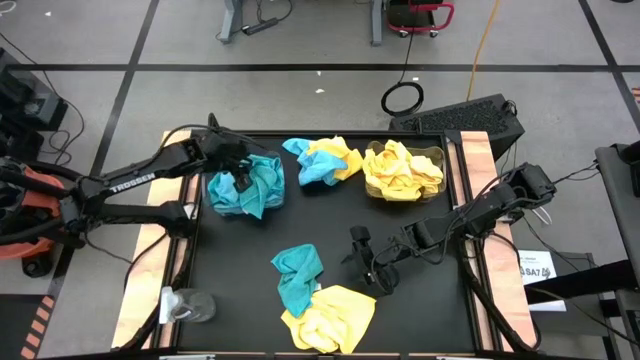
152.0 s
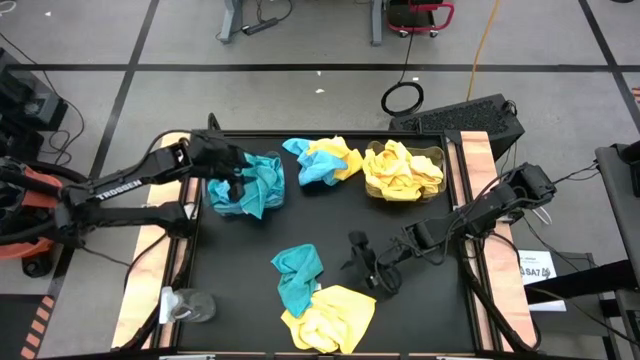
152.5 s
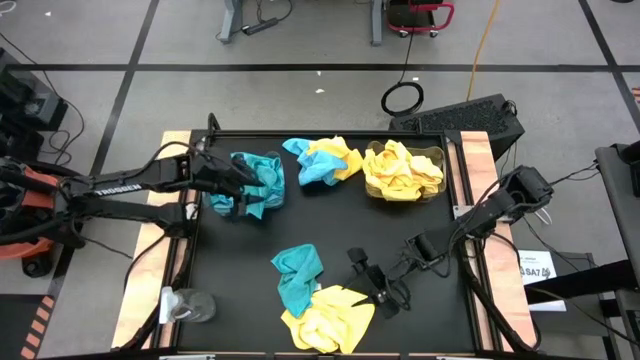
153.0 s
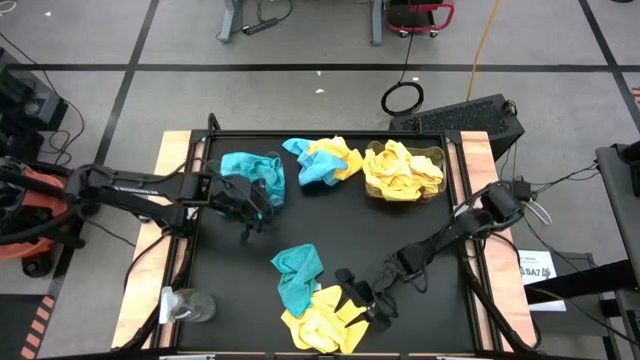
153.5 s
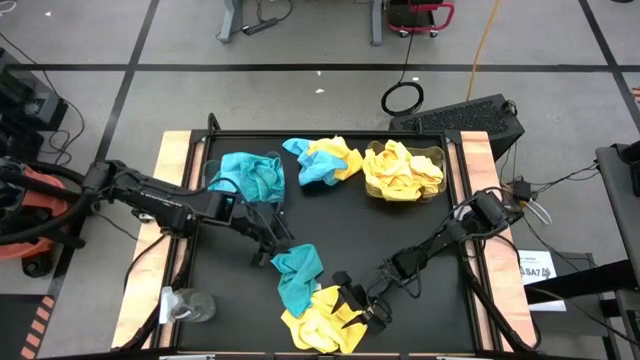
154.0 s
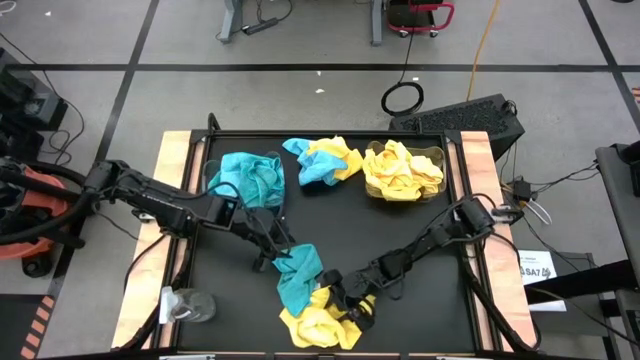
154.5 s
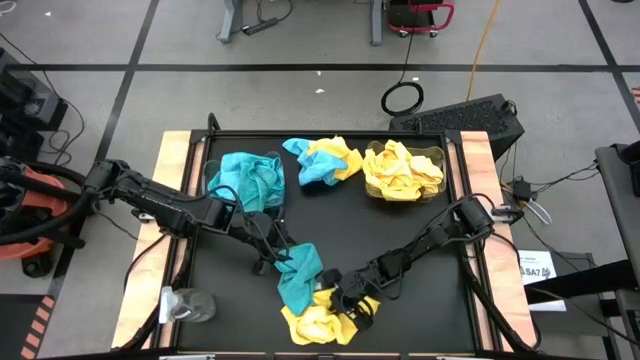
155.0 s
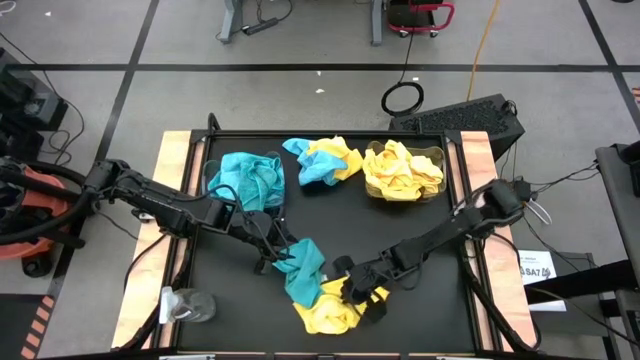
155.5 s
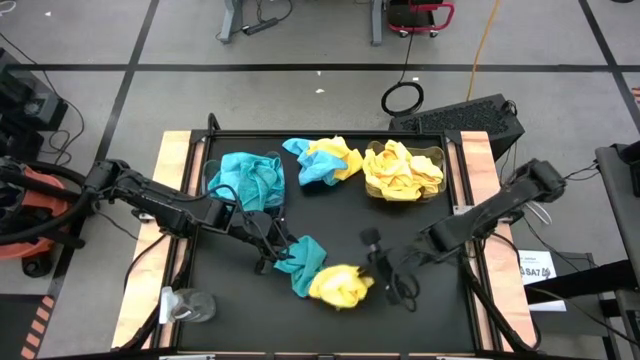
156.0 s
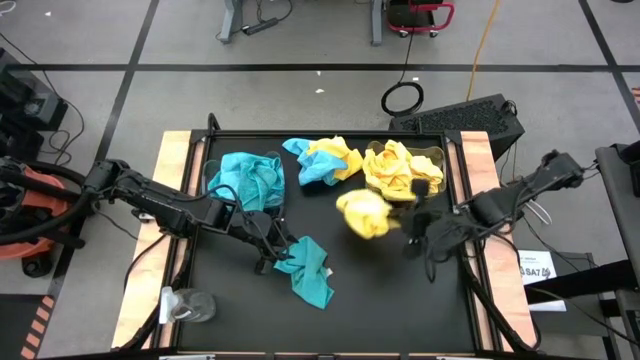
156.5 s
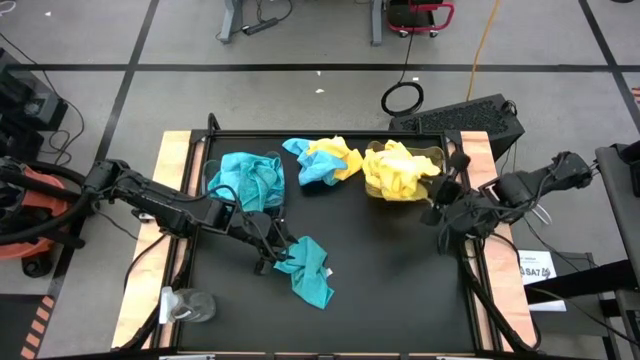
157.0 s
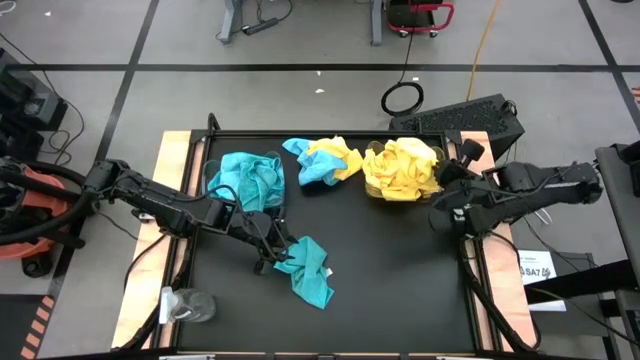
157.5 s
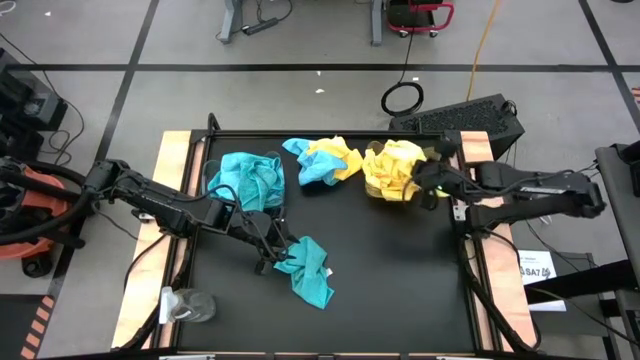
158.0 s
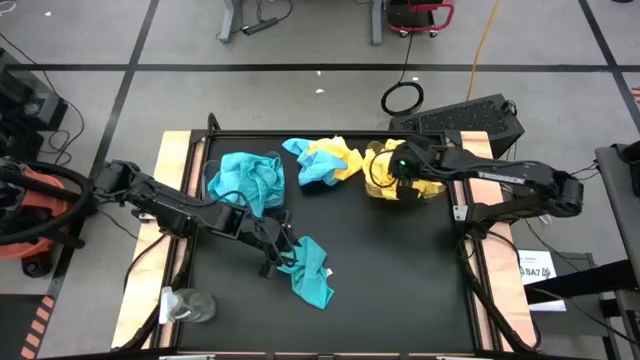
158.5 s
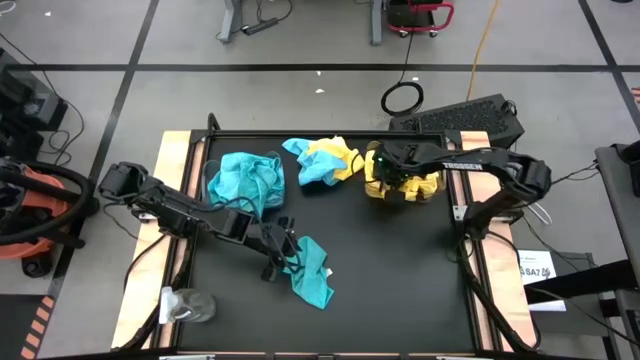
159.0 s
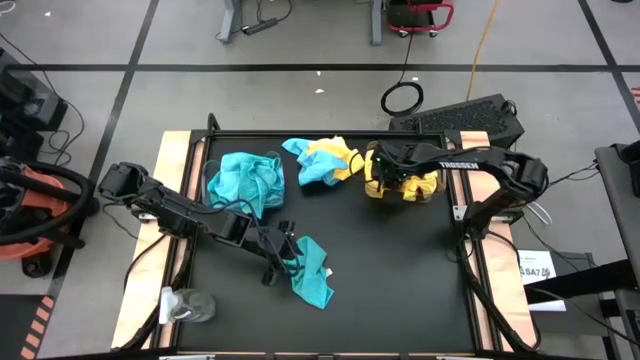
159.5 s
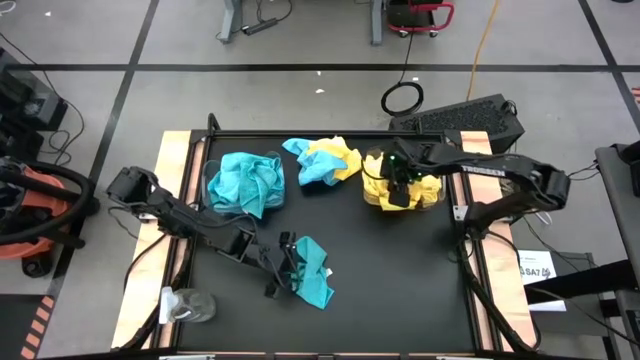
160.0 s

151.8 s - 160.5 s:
Task: Sort microfiber towel by color & place in baskets
Put the yellow microfiber cloth into the right transparent bin

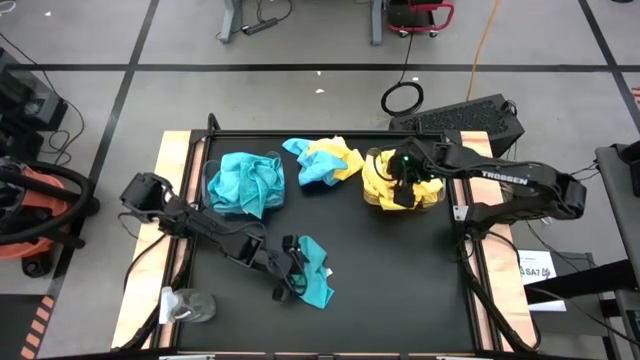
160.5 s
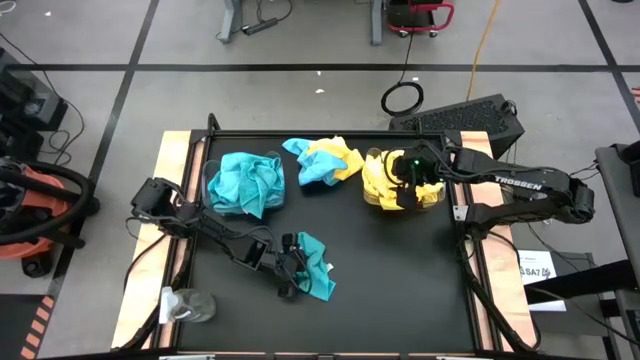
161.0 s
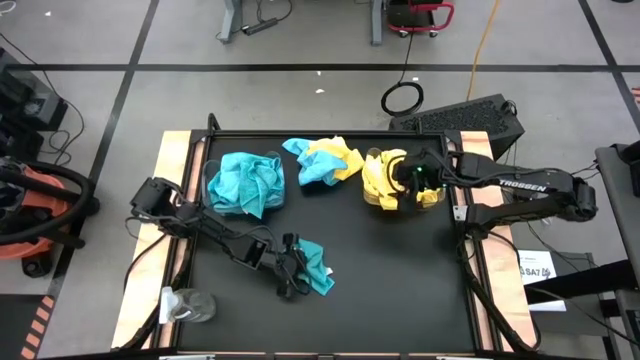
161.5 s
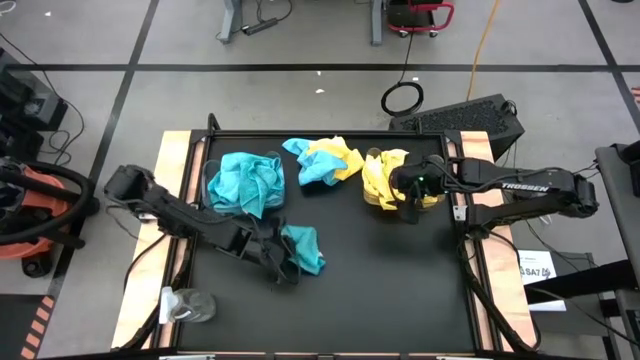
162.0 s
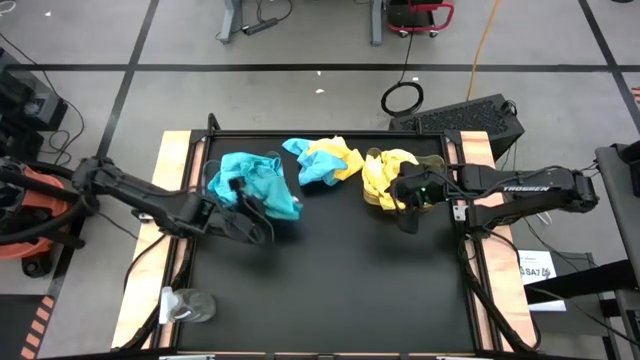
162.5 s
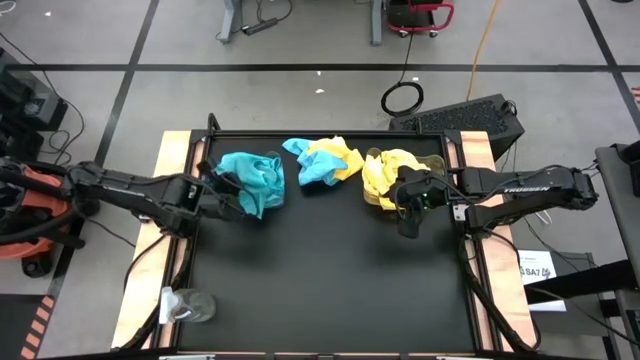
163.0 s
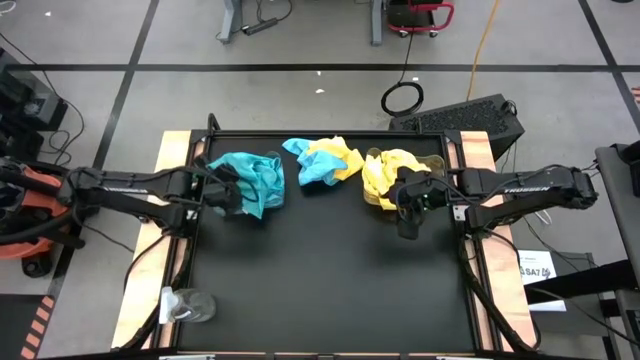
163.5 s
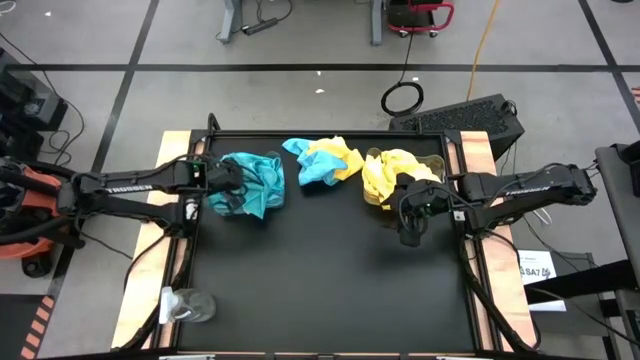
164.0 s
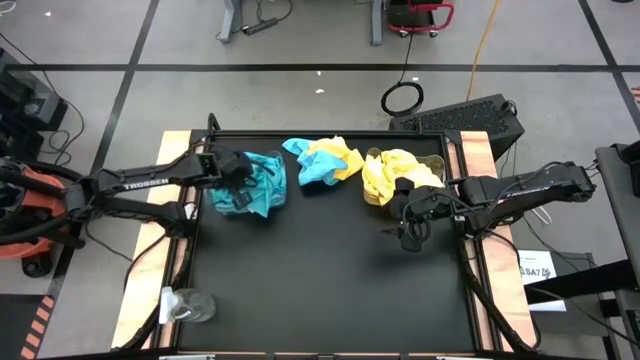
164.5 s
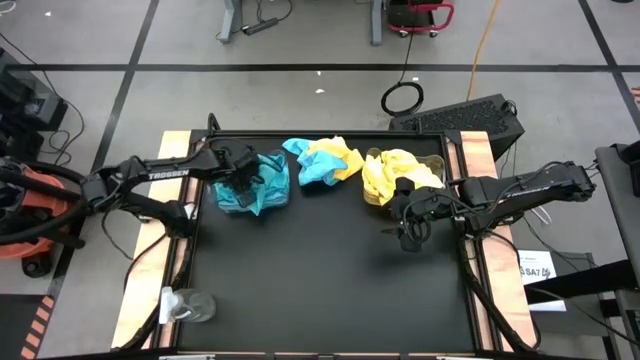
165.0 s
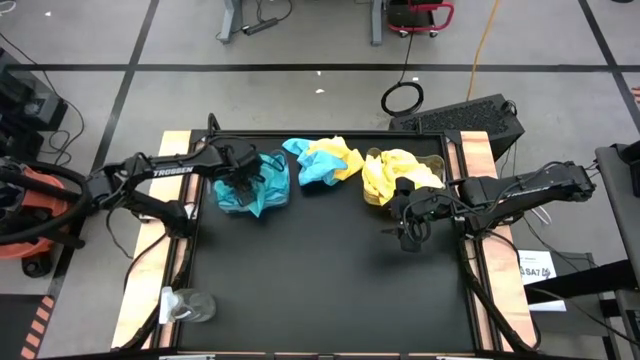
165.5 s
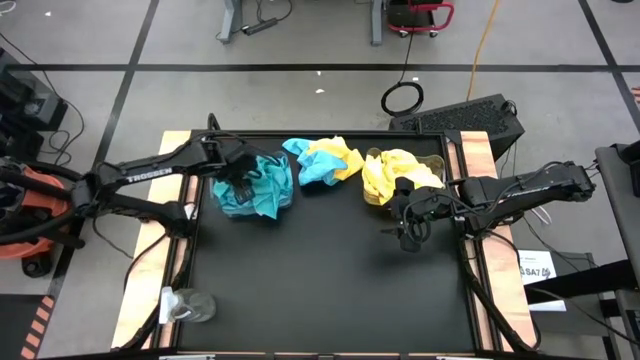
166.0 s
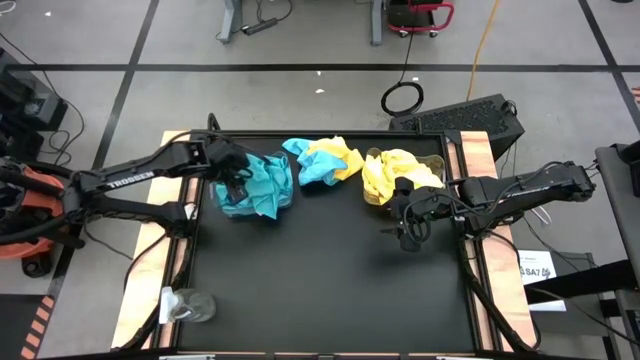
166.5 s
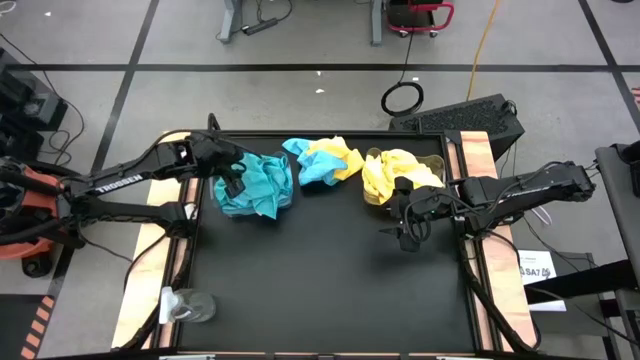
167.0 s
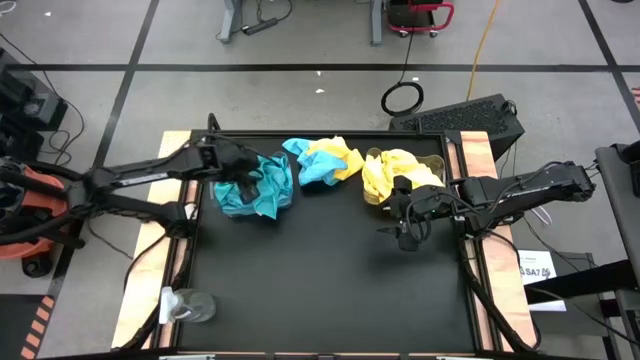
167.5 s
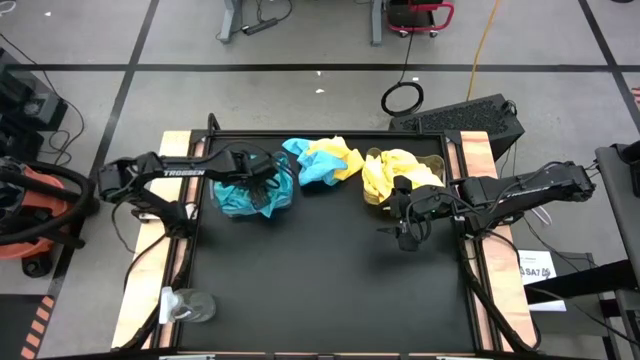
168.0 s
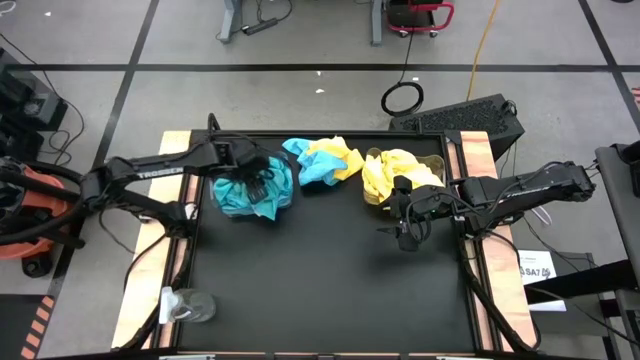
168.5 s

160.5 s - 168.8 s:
Put the blue microfiber cloth into the left transparent bin

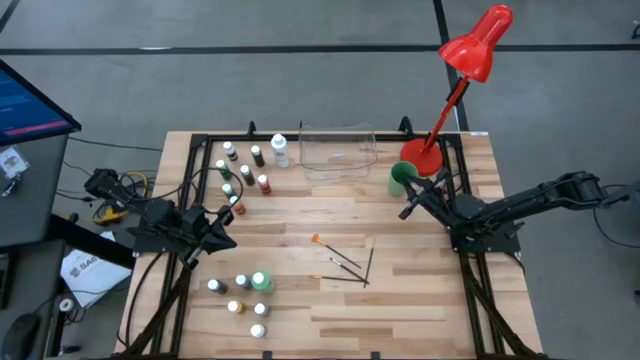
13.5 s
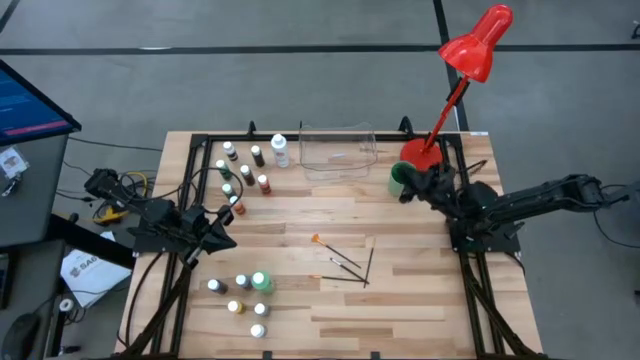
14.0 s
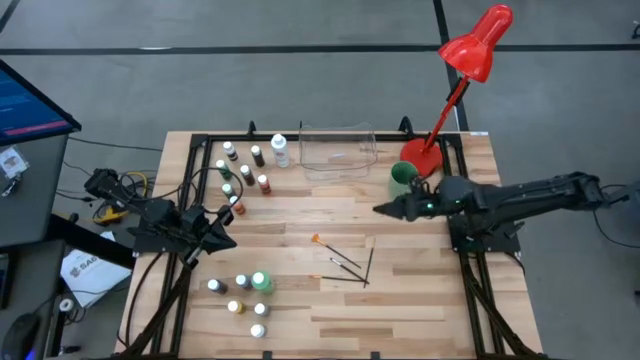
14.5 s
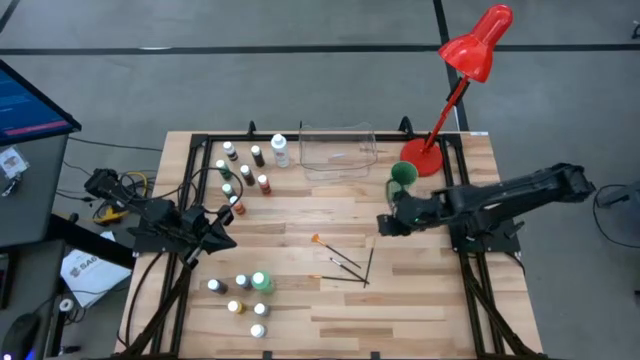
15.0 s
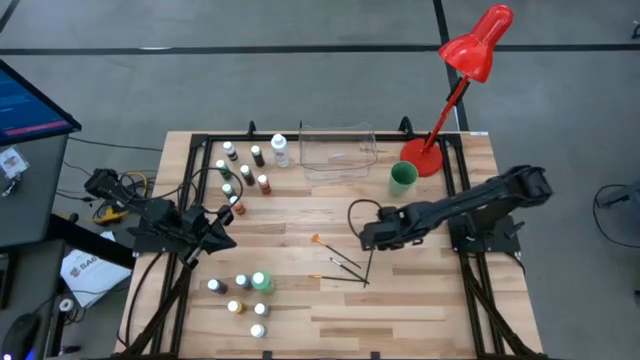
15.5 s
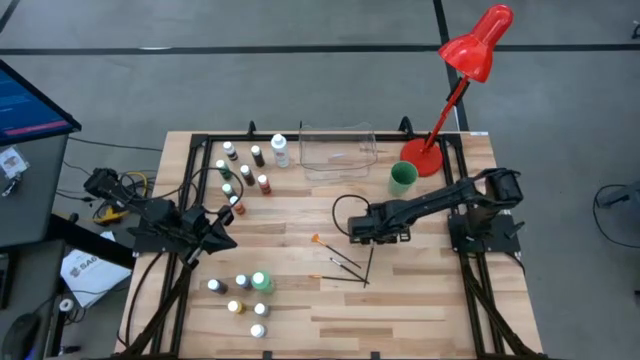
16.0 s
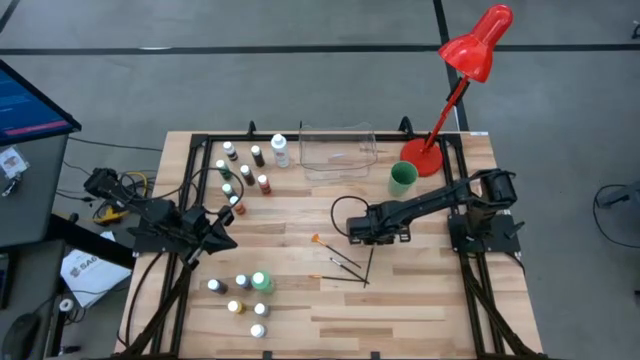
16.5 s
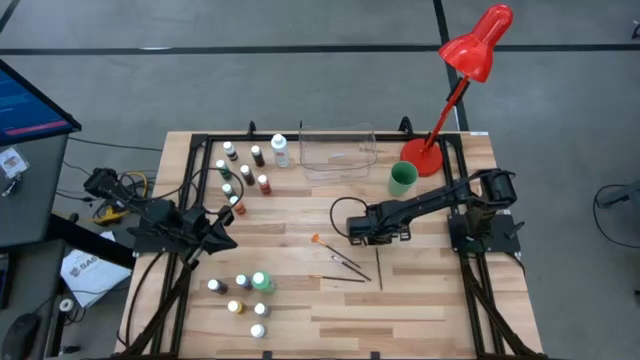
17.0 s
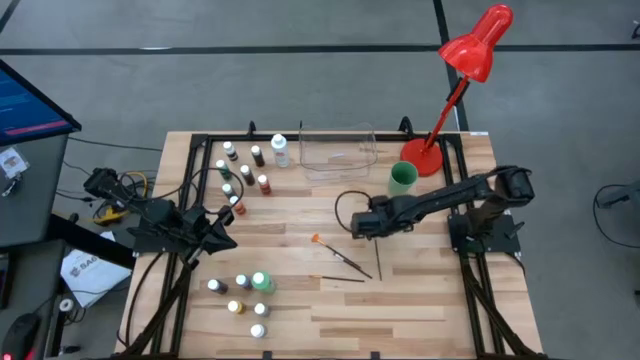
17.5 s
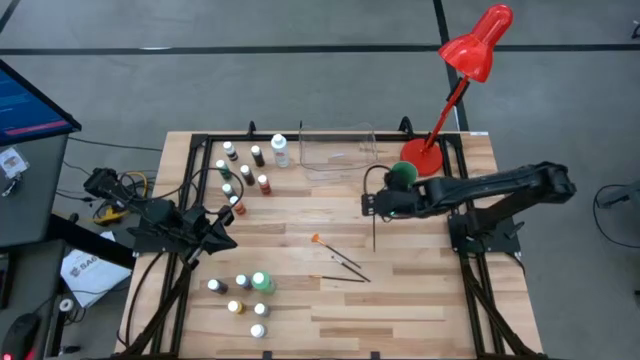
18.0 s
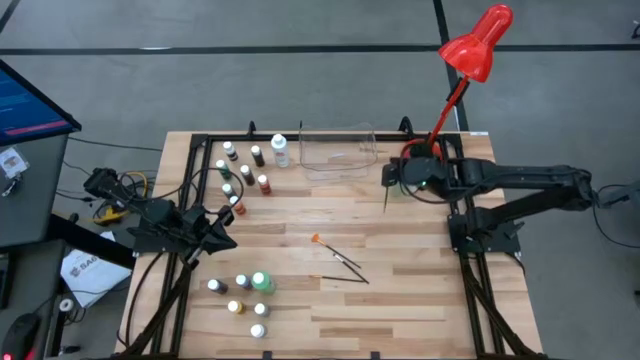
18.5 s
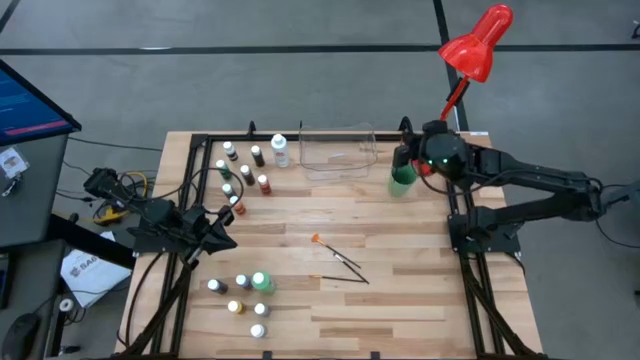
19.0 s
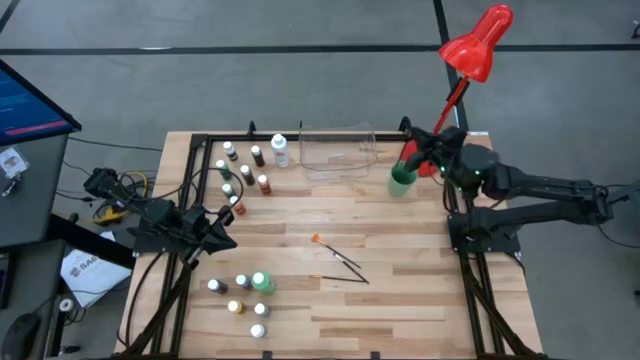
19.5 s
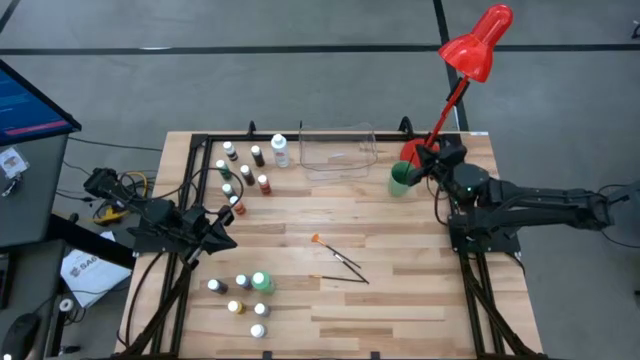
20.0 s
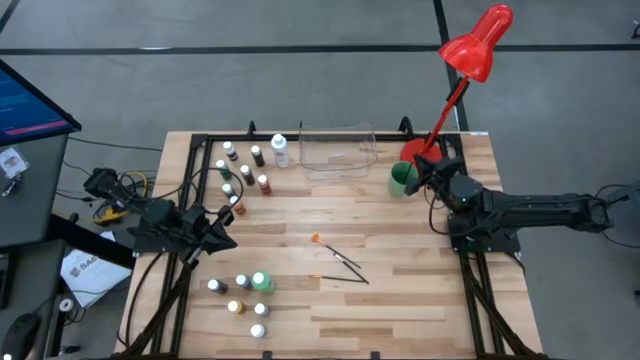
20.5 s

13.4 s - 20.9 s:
Task: Pick & Place Paint Supplies
Put the top right gold paint brush into the green cup
